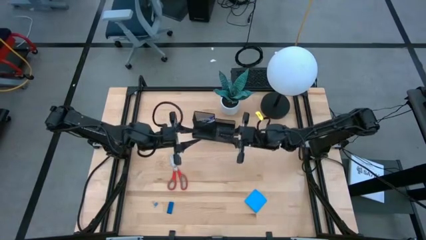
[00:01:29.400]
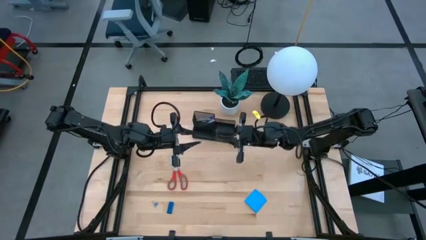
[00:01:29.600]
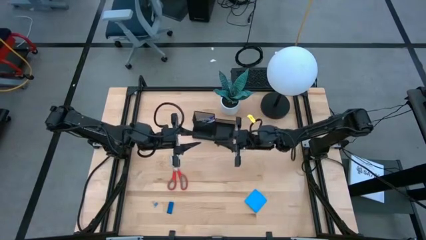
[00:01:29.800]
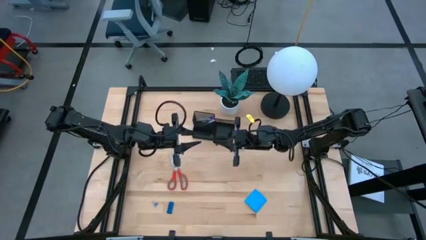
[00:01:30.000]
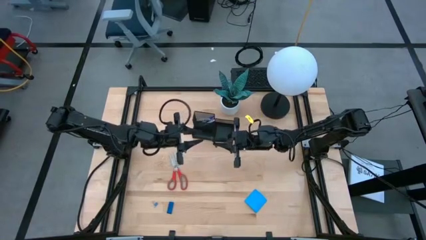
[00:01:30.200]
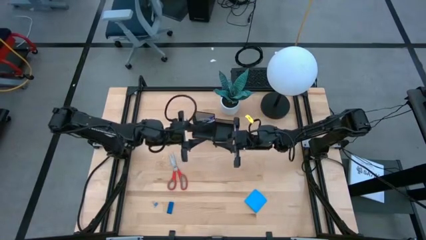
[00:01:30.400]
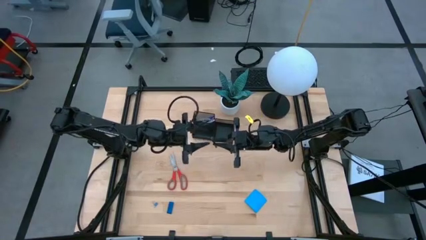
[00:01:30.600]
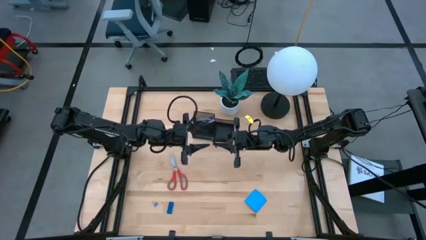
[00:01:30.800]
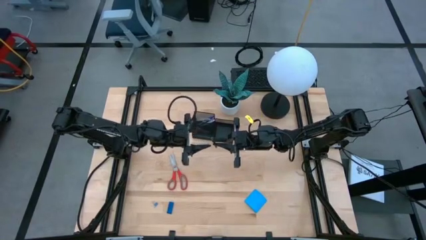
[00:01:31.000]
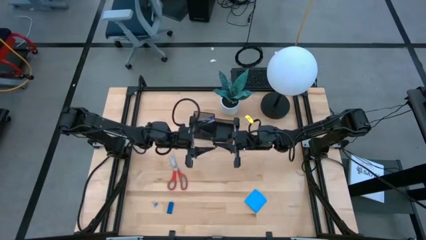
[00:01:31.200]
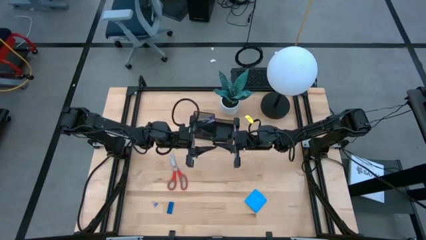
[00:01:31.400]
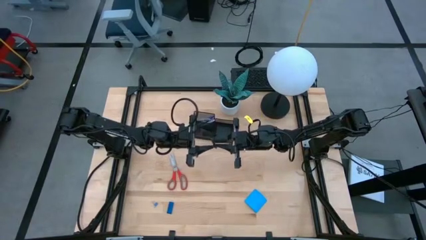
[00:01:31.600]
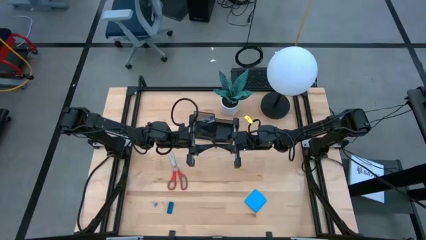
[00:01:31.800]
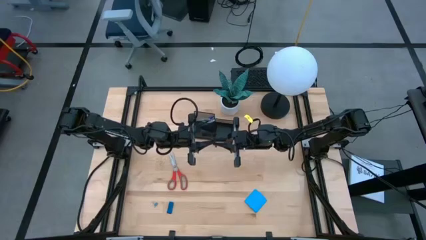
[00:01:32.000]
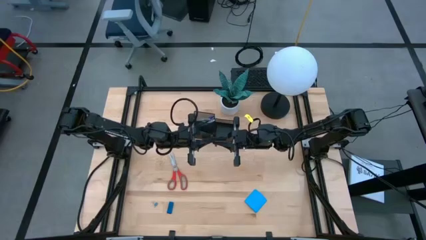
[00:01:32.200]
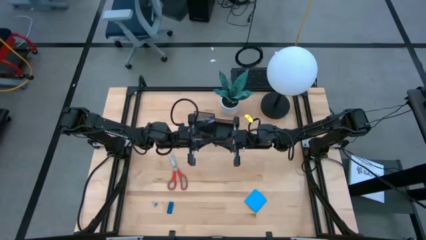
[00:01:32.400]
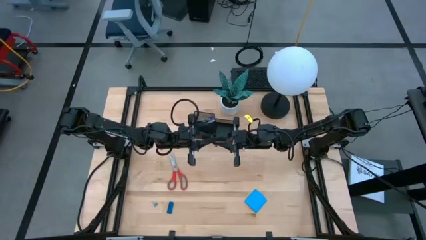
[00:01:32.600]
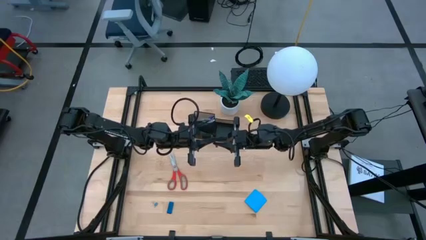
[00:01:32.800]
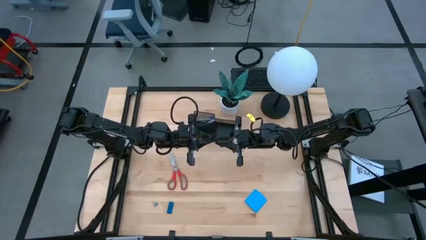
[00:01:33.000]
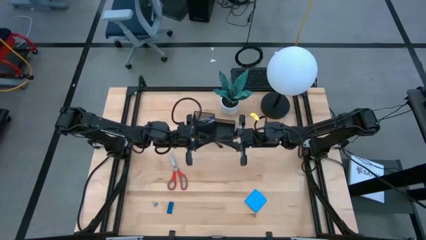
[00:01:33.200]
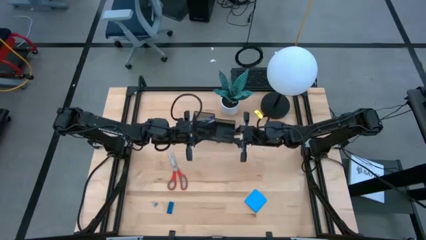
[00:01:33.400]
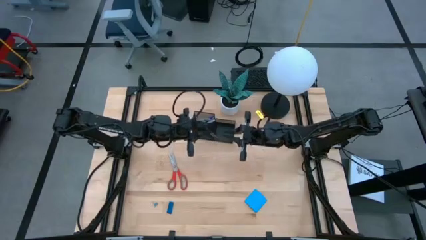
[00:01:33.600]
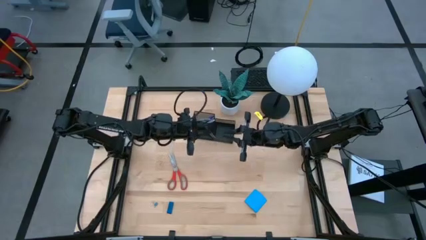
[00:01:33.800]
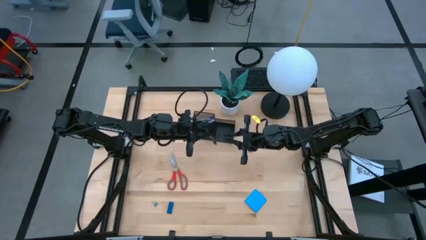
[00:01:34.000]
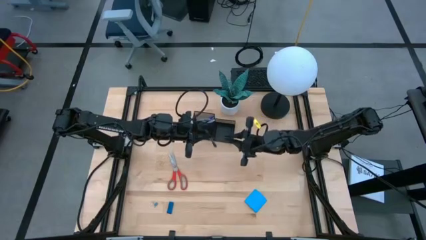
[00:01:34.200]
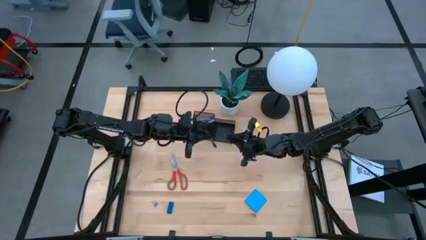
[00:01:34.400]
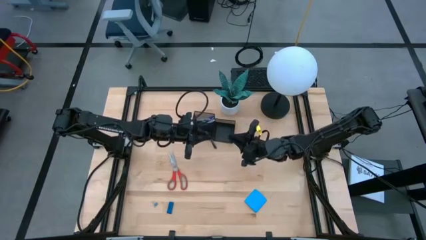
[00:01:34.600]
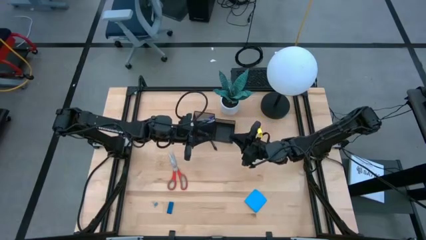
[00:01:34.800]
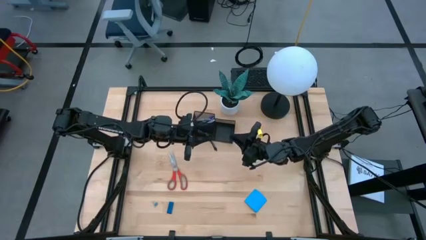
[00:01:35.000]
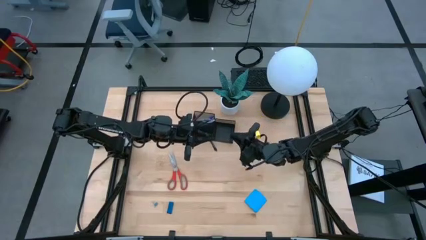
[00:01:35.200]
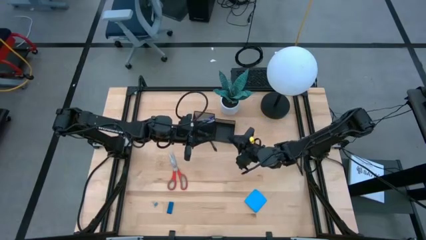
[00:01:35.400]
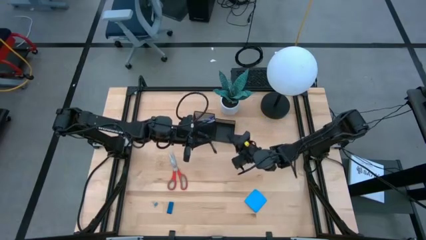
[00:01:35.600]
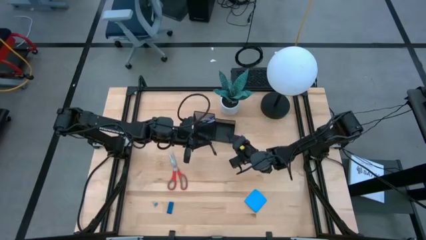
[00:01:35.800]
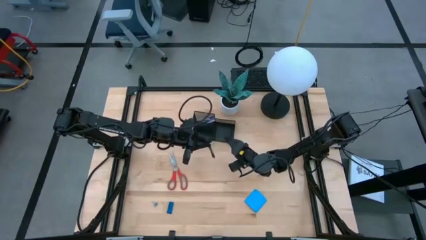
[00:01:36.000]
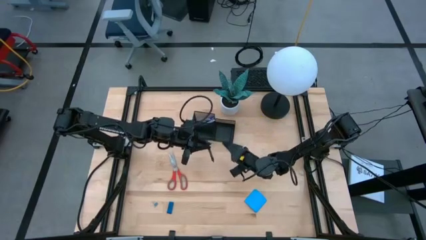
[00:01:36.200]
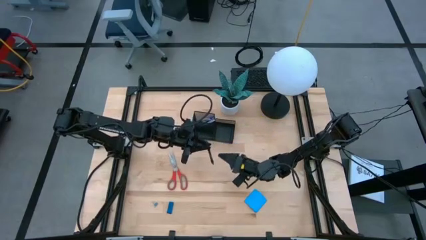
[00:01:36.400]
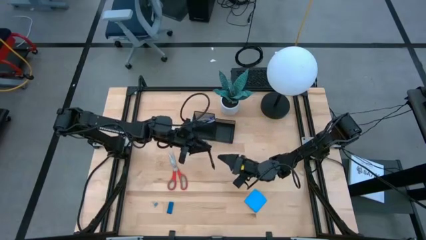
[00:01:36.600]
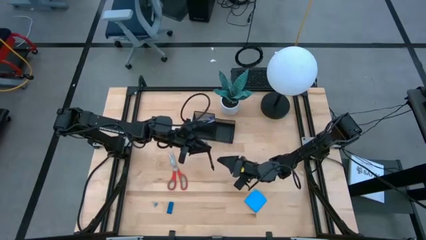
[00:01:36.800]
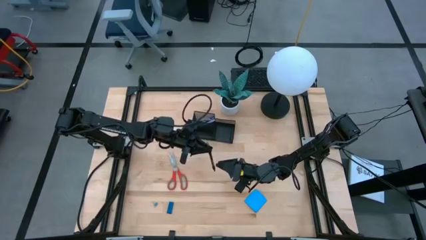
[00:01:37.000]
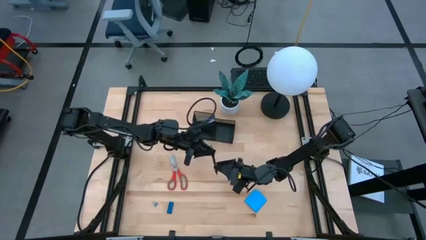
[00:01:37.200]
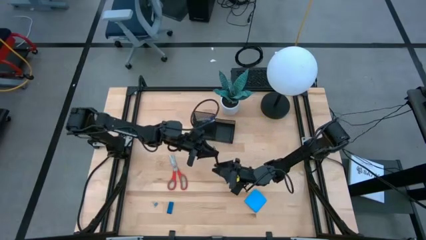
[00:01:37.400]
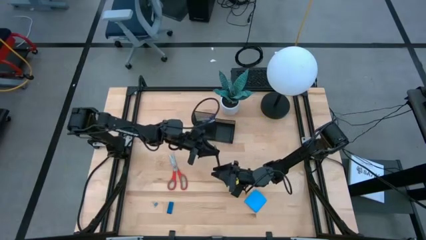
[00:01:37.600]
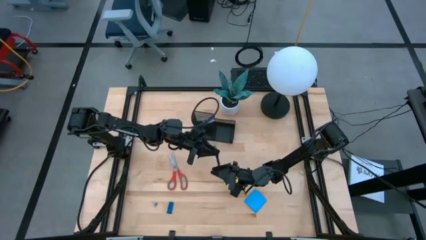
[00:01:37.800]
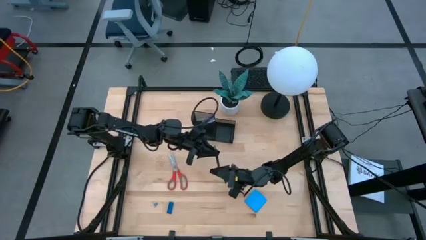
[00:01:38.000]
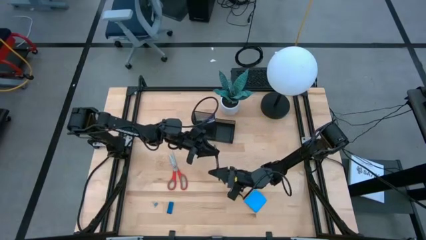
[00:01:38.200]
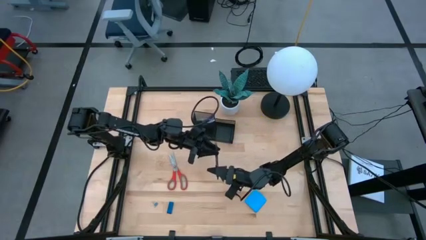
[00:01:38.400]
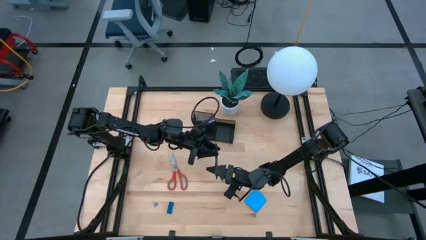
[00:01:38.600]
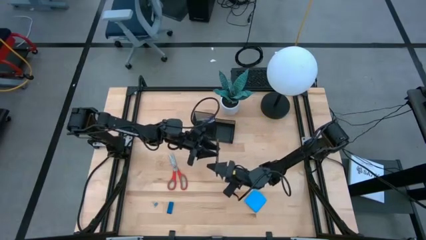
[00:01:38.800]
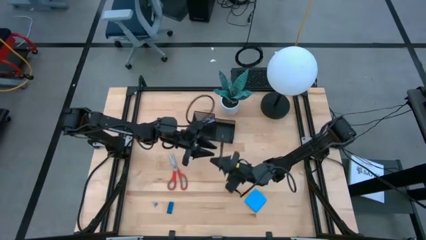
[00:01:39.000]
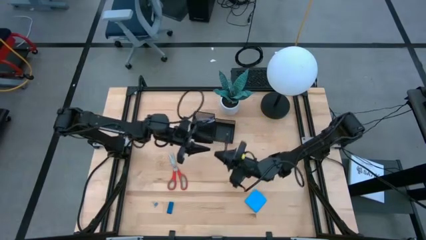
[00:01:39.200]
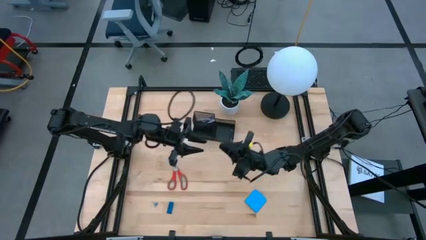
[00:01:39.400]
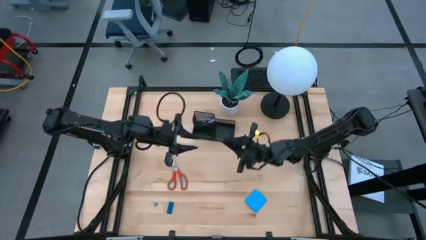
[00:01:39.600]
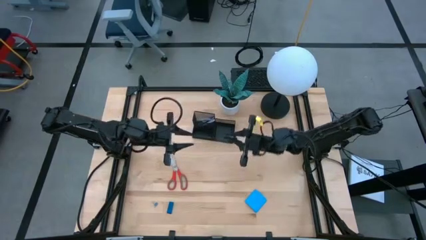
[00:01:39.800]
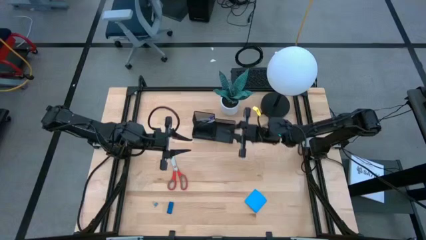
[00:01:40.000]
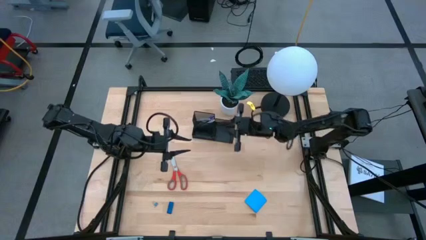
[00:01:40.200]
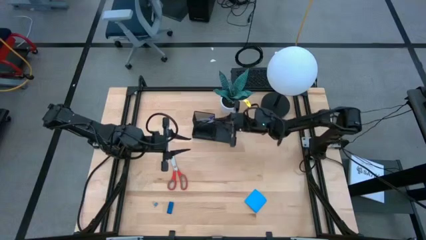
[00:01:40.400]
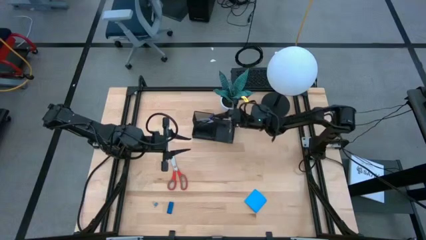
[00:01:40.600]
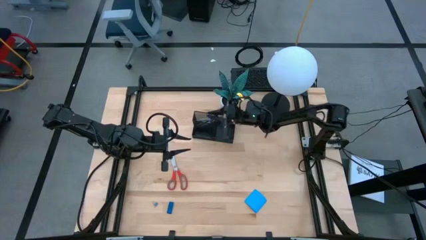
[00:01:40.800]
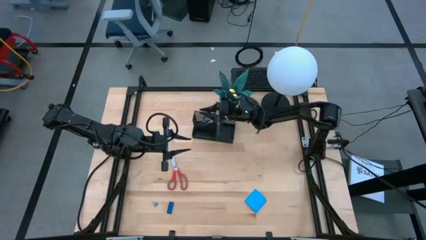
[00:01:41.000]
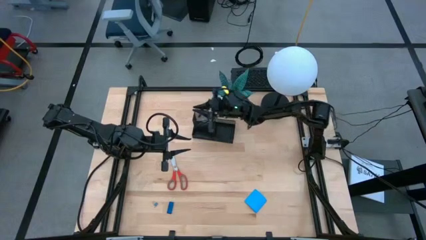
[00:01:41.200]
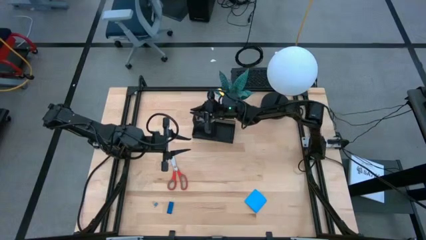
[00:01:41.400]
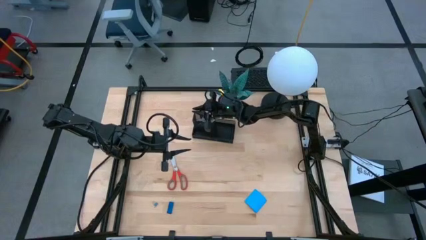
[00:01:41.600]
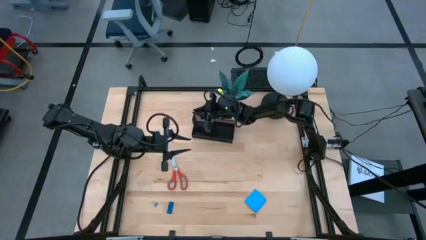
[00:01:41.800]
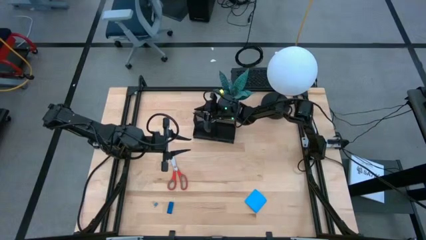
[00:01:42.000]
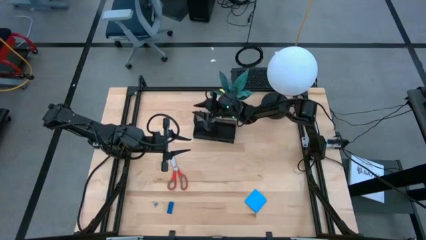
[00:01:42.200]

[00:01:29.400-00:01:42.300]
Task: Pick and place office supplies into organizer
Put the black pen into the black desk organizer

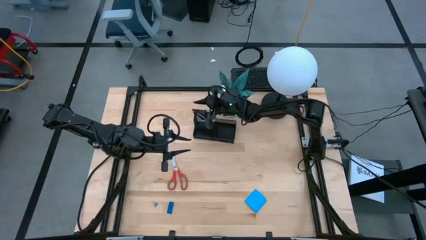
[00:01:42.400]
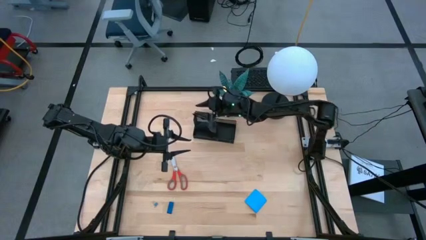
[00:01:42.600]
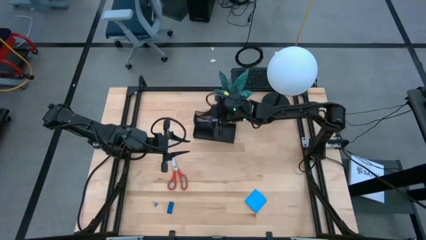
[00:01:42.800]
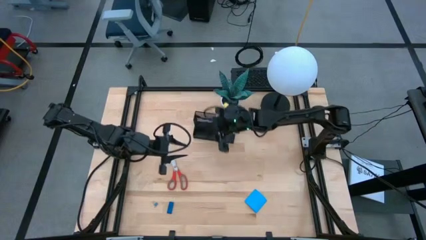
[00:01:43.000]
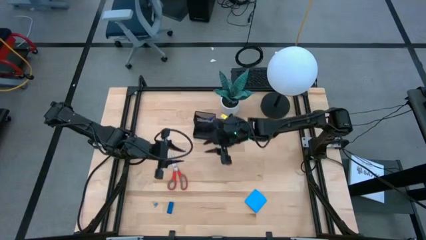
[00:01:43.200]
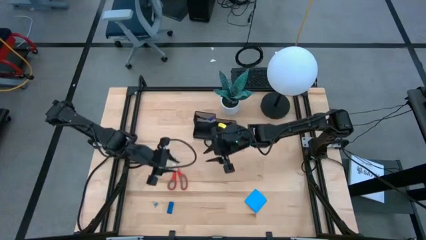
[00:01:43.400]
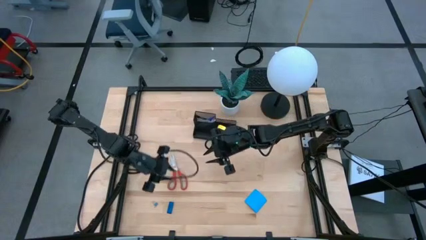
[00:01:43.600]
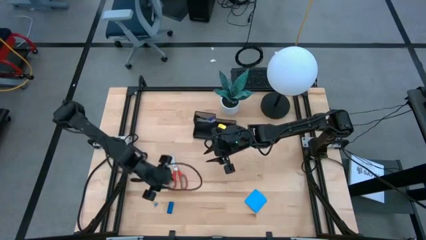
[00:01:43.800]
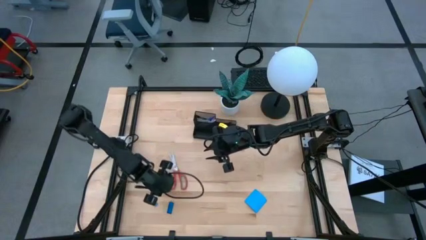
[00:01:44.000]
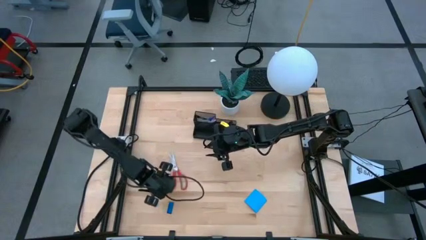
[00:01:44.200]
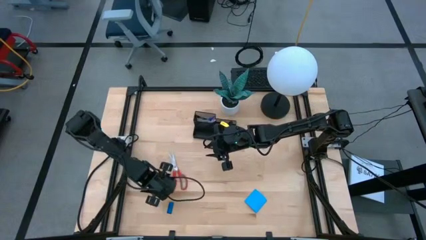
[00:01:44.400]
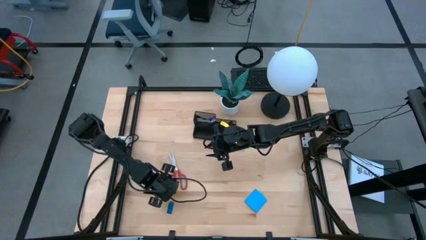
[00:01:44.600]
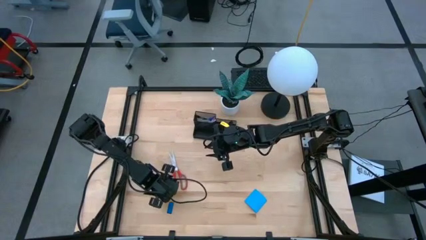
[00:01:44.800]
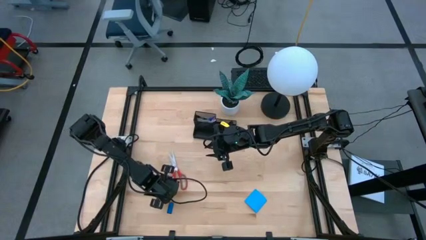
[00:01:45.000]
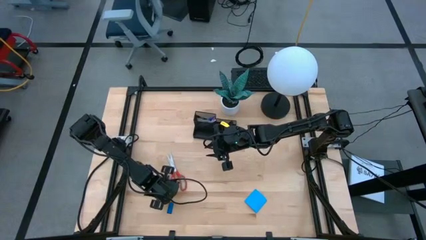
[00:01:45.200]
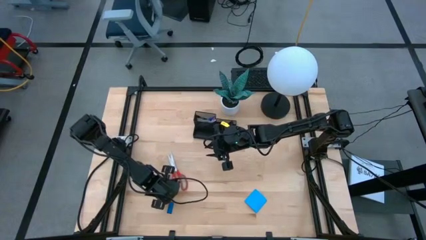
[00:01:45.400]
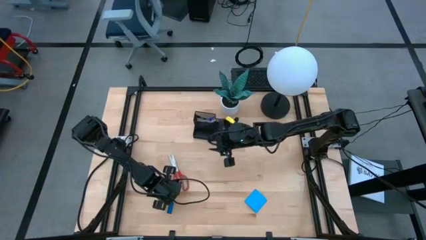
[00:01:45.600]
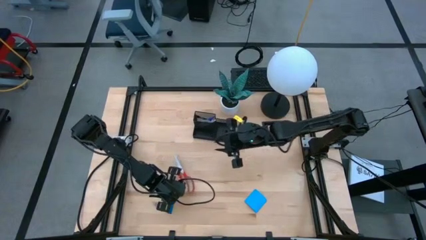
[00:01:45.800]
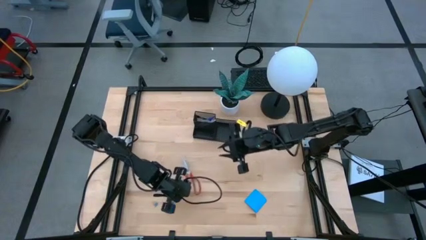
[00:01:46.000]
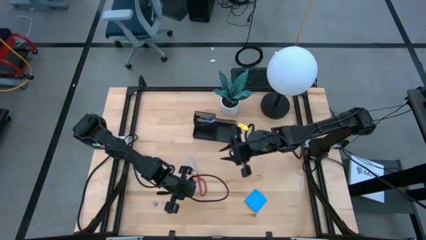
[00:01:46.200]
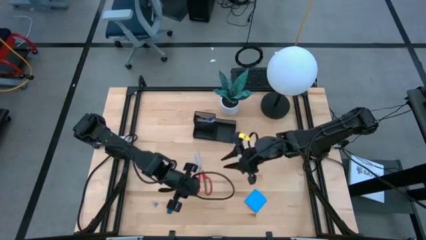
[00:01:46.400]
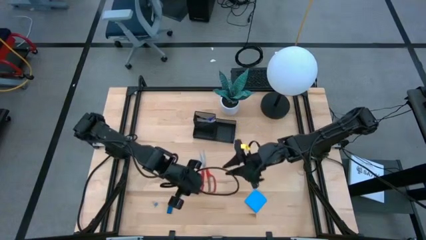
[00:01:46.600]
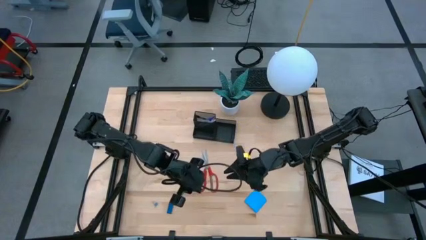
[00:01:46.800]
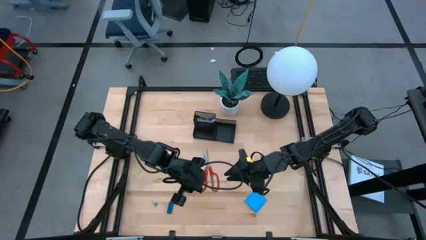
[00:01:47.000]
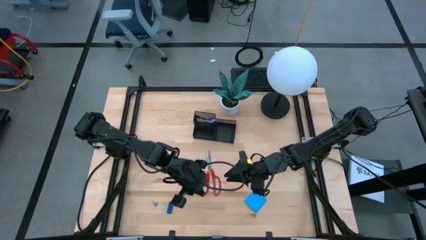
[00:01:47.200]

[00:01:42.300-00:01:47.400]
Put the red scissors into the black desk organizer
